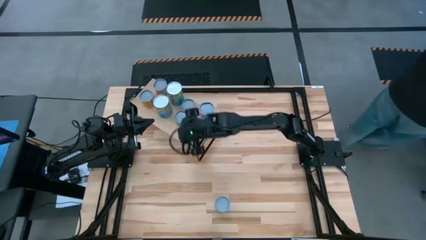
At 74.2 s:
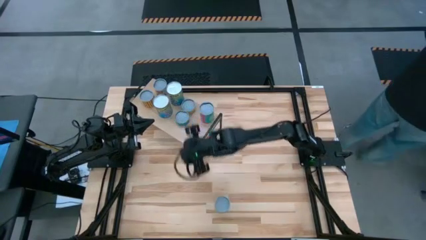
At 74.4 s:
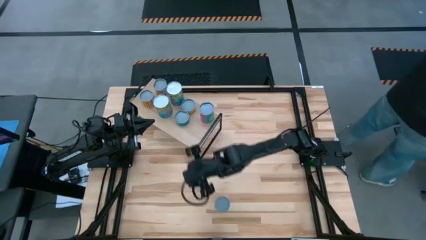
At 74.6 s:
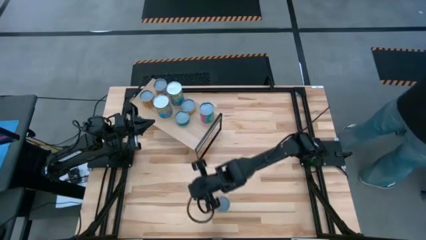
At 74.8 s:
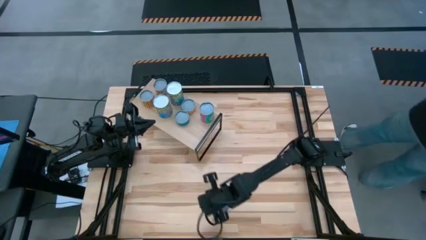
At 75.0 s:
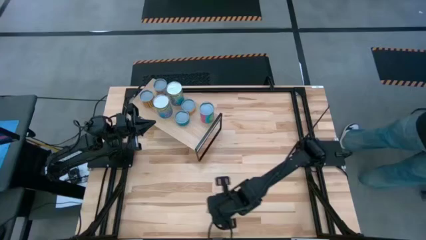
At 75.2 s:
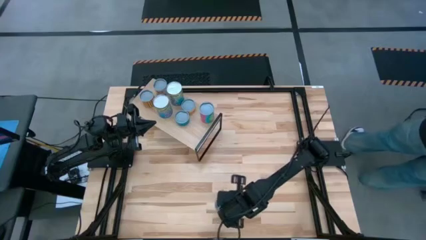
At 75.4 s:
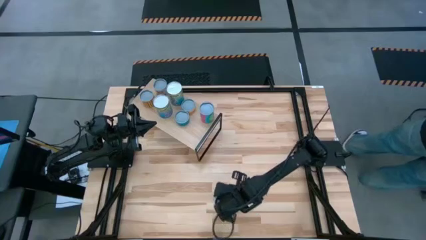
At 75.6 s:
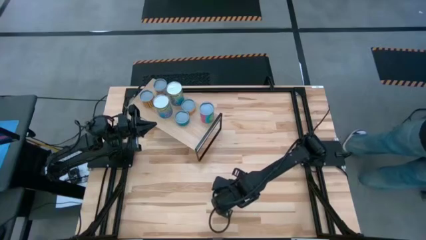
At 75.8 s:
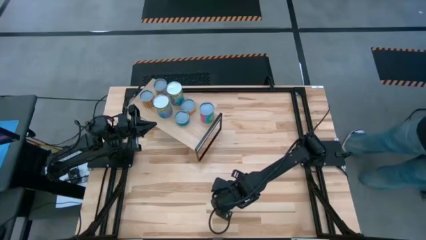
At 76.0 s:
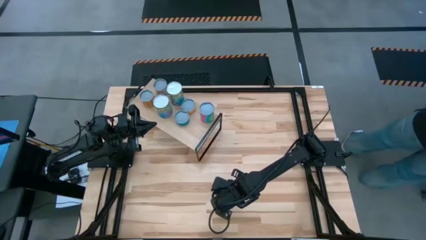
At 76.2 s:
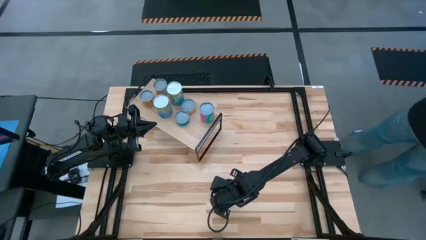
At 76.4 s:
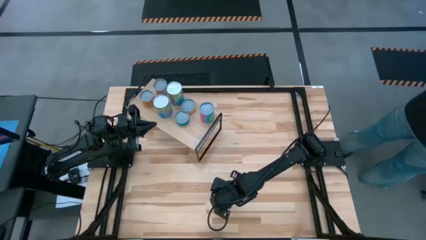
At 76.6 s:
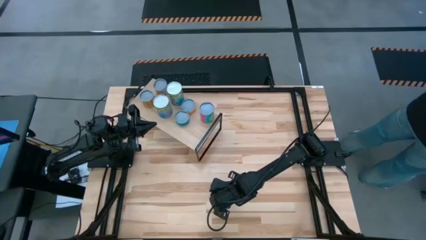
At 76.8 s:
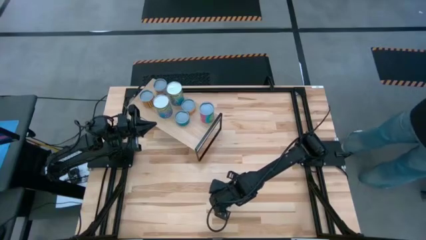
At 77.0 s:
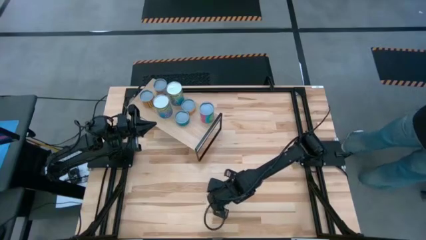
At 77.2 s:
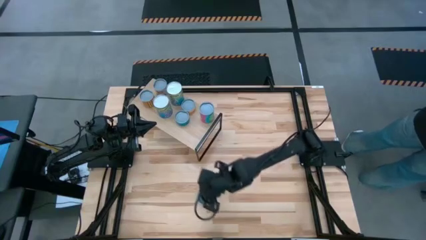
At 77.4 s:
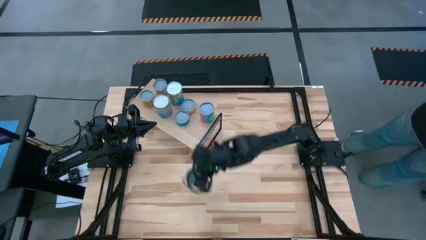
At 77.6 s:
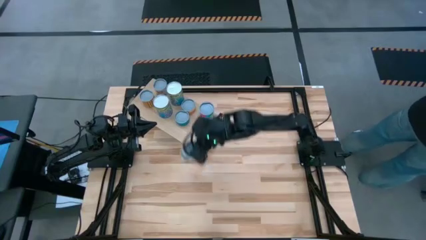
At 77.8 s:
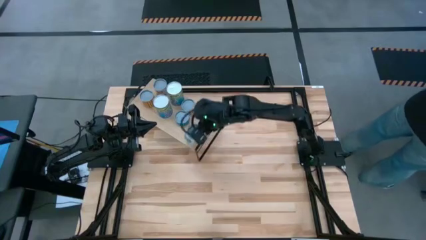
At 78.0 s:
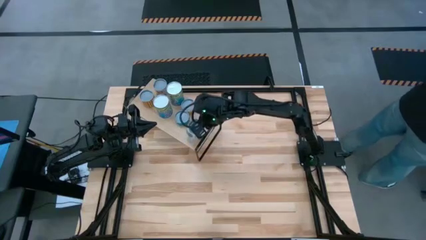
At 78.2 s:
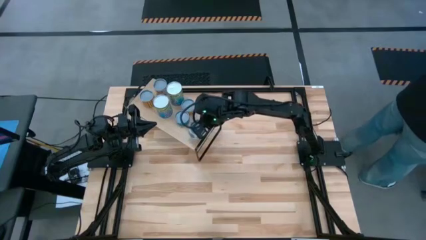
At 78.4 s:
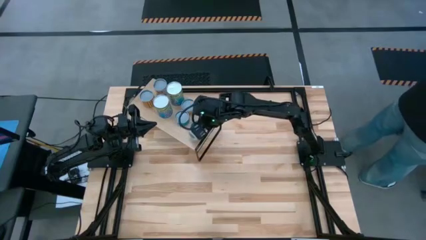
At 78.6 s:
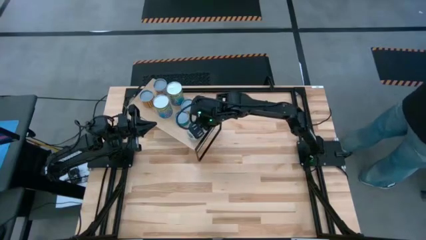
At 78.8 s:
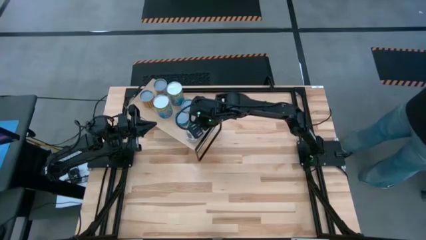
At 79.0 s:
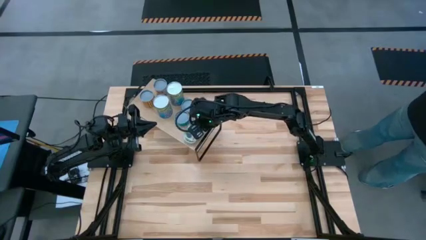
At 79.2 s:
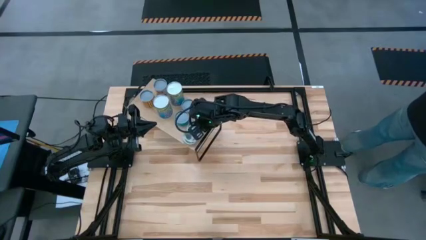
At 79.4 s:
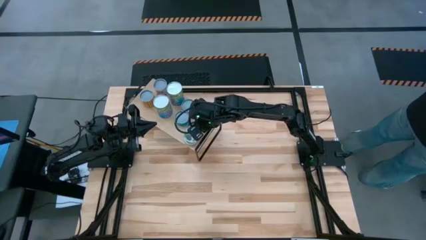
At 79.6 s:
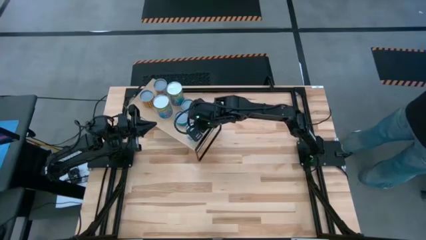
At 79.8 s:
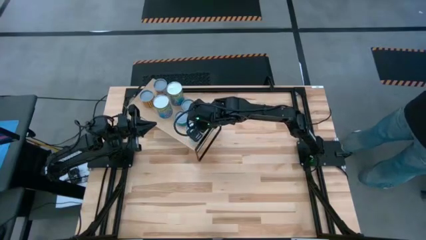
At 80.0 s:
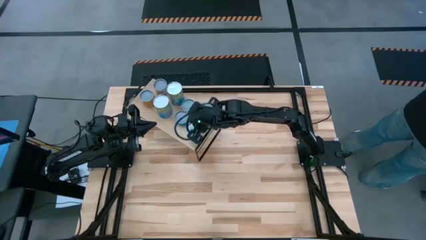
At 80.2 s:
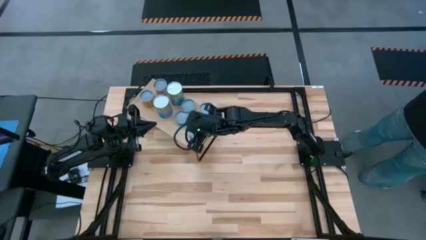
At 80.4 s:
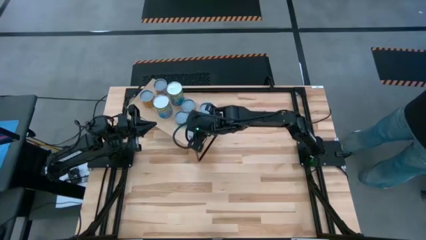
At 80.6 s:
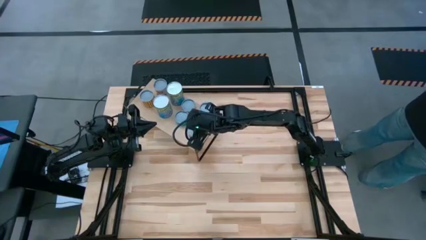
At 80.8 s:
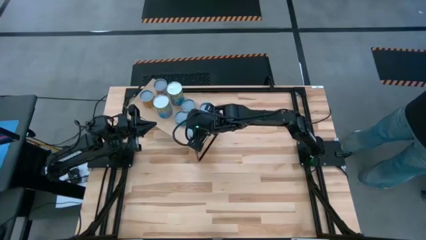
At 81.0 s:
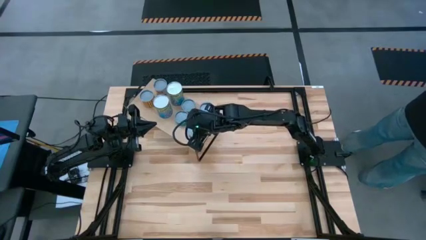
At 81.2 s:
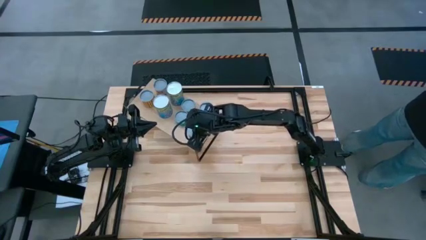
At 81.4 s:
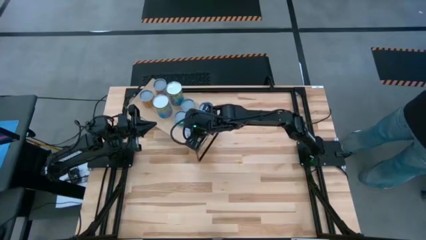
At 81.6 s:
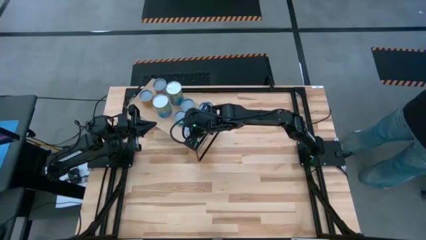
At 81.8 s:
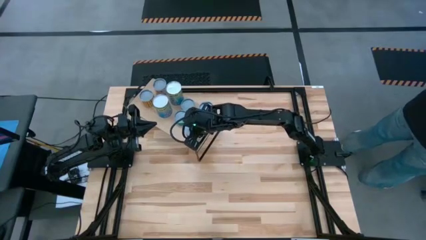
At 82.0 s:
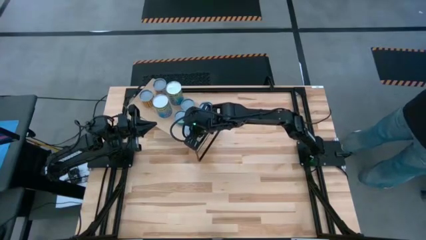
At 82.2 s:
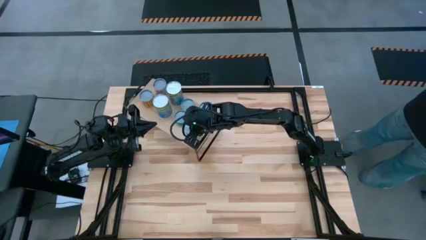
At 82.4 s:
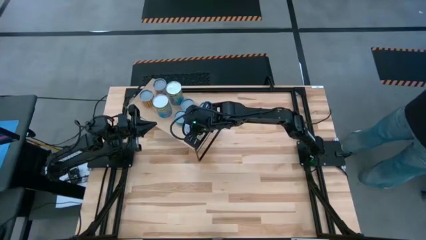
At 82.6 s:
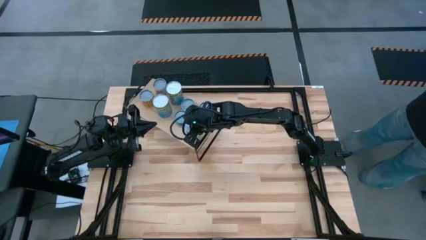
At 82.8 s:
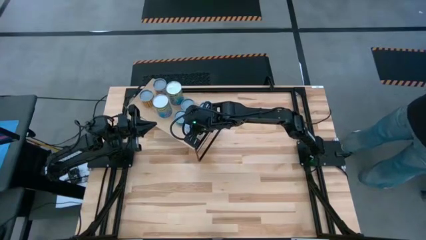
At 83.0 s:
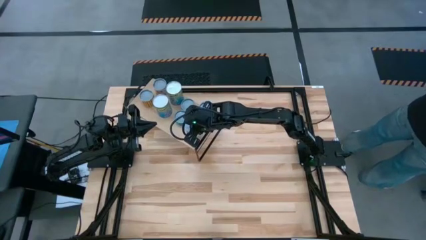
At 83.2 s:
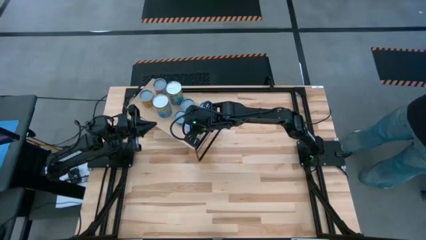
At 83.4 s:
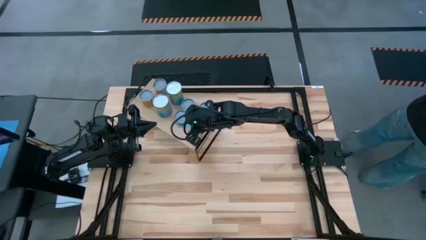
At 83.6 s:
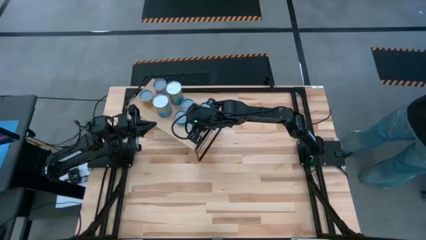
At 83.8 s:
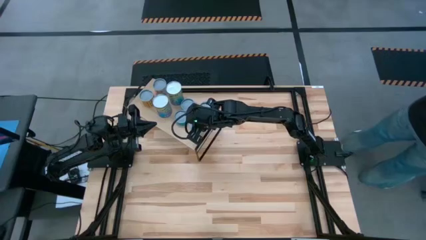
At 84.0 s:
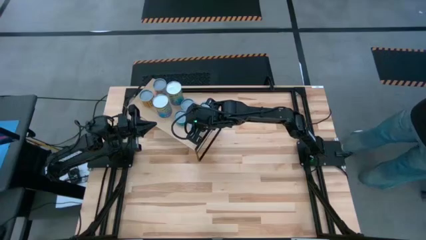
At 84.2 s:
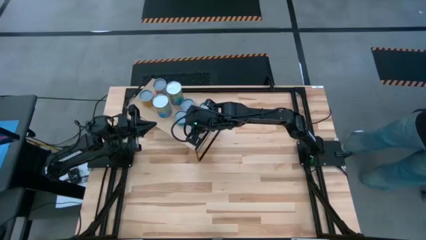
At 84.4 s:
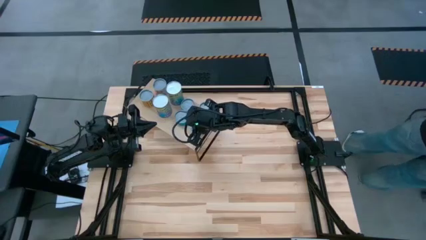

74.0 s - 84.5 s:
Task: Pick and place cans onto a shelf
Put the canned mixed vegetables on the shelf

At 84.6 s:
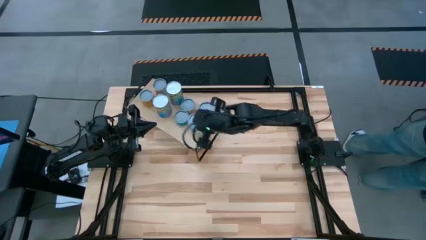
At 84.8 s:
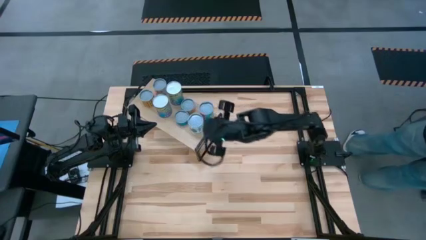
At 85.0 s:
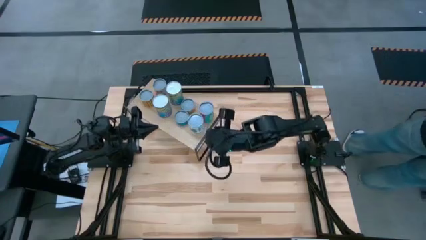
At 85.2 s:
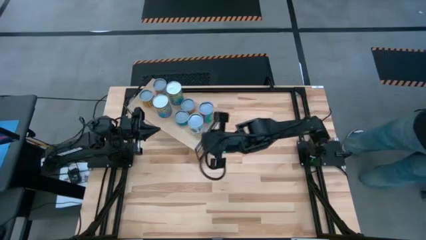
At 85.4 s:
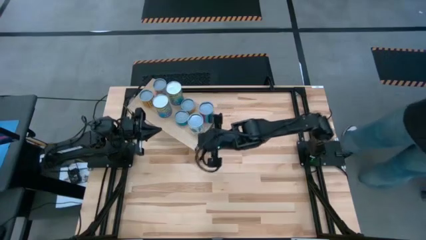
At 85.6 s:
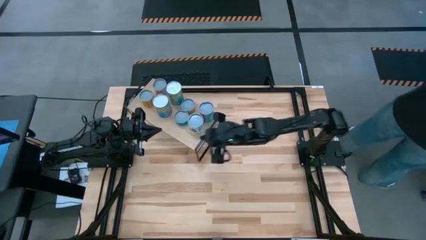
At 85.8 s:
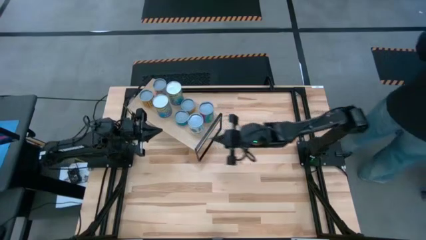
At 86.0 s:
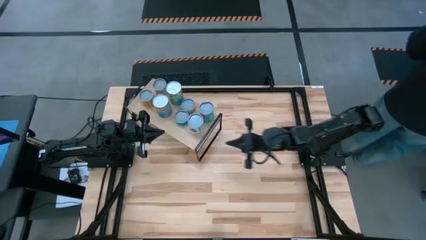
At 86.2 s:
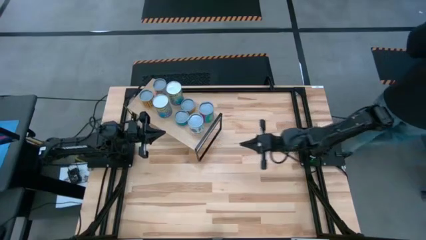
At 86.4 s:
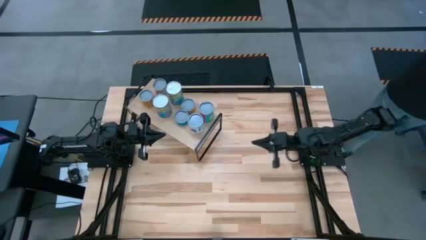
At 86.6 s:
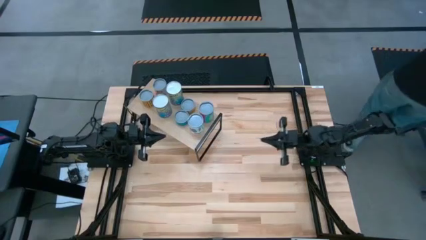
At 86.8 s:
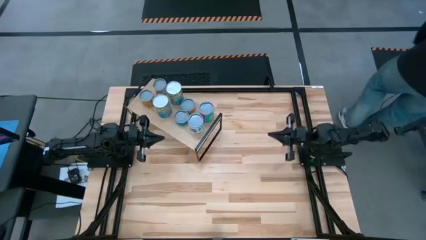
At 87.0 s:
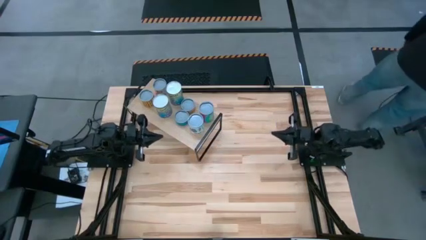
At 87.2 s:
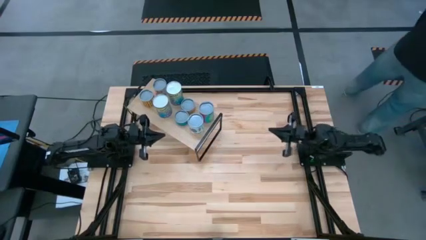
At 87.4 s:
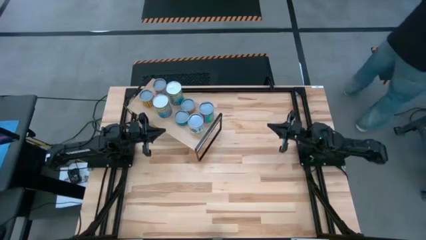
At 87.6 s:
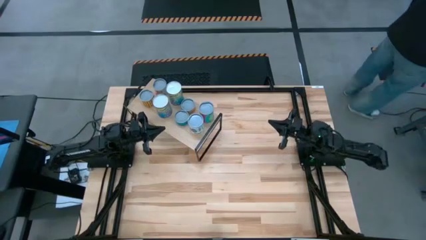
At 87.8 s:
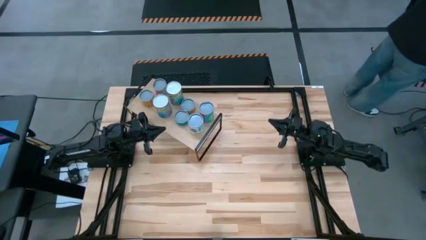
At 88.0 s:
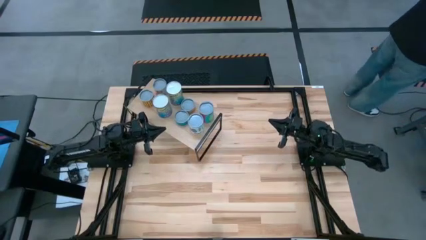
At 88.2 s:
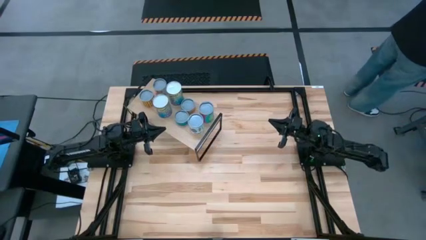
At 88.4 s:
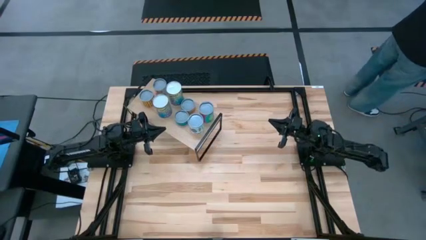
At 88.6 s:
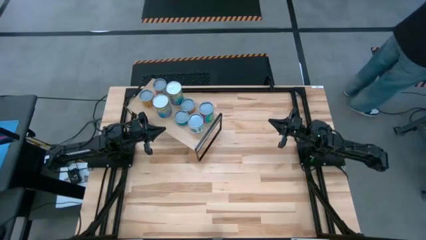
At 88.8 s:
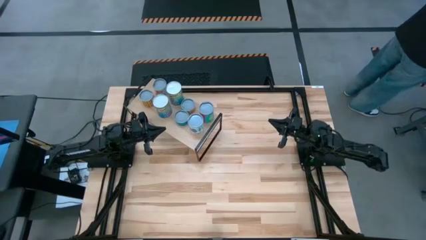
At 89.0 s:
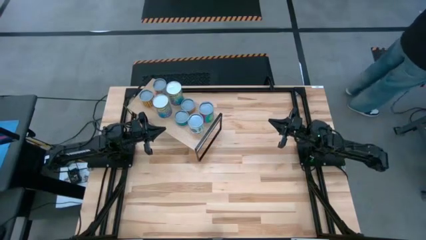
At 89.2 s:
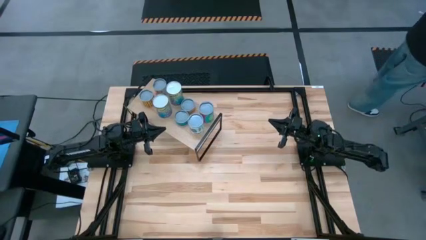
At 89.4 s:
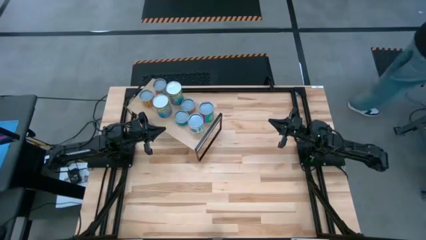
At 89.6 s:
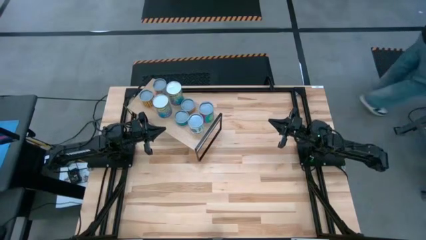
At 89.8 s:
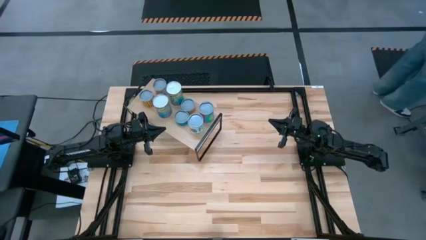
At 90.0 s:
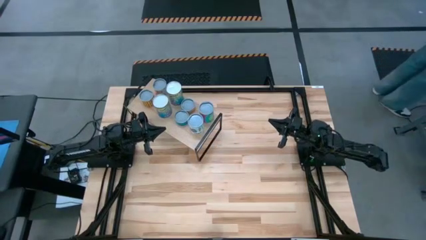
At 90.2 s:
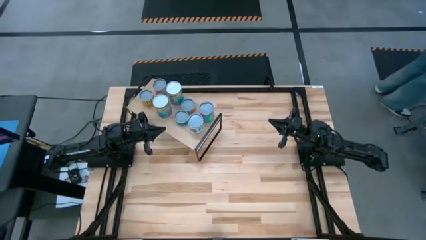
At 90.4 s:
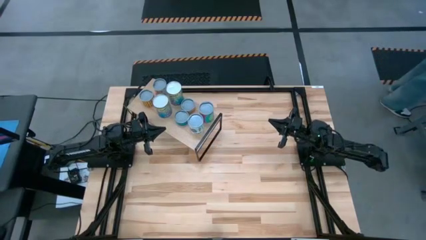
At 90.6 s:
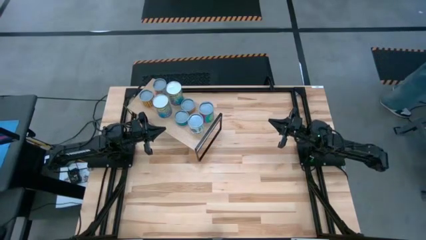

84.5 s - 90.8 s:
Return to Home Position
